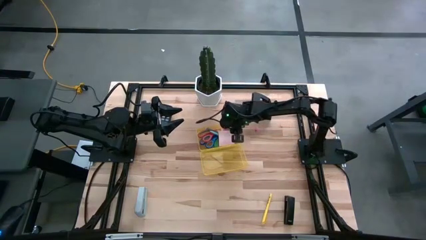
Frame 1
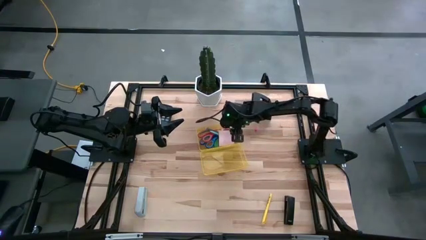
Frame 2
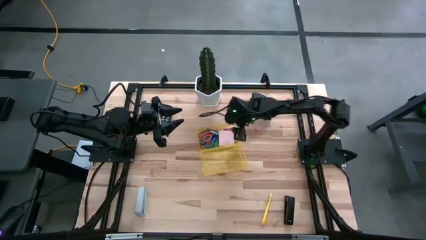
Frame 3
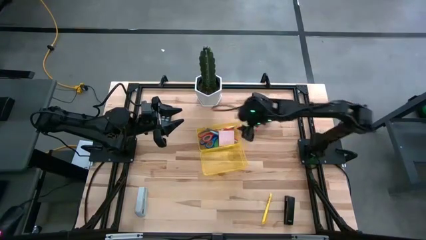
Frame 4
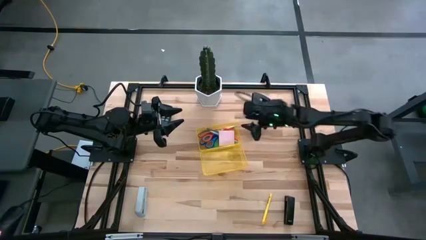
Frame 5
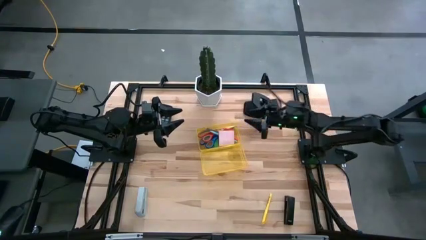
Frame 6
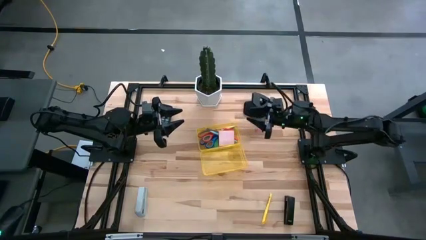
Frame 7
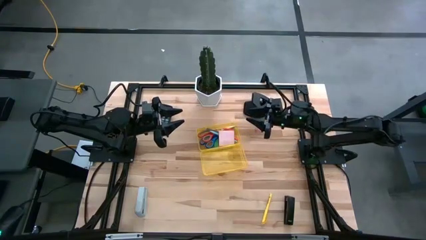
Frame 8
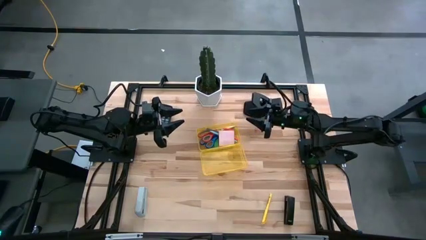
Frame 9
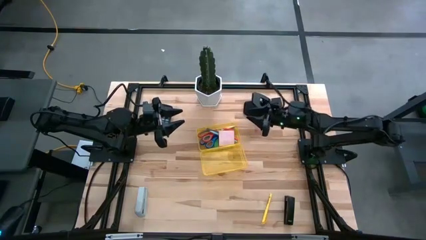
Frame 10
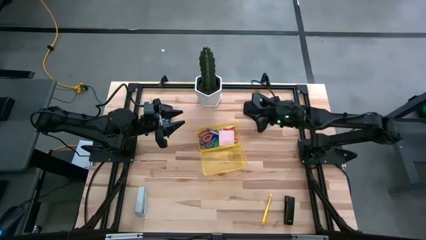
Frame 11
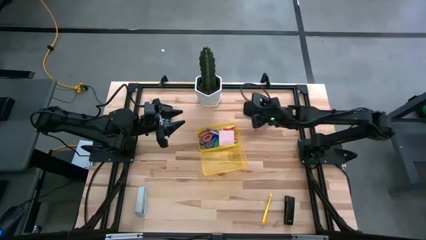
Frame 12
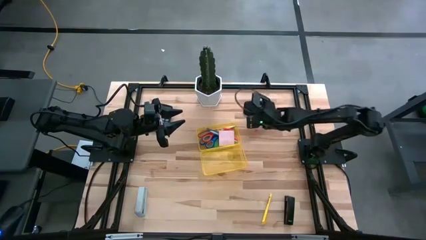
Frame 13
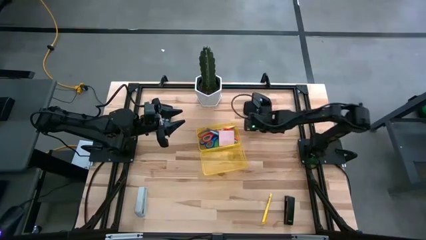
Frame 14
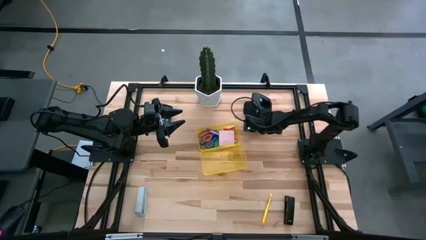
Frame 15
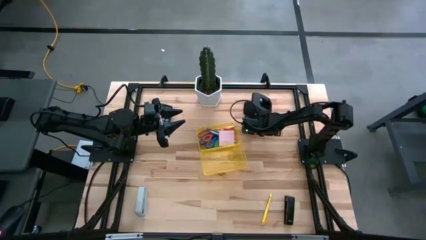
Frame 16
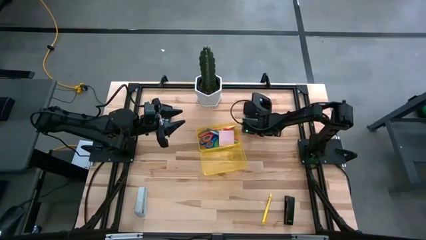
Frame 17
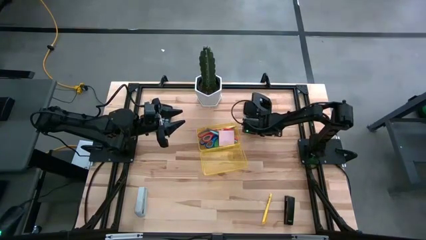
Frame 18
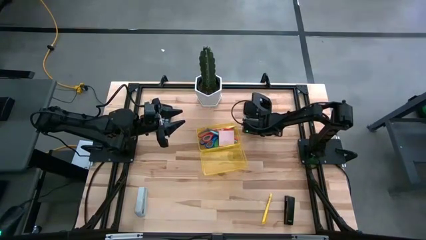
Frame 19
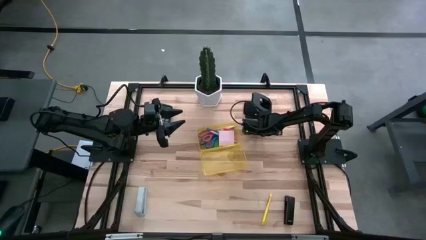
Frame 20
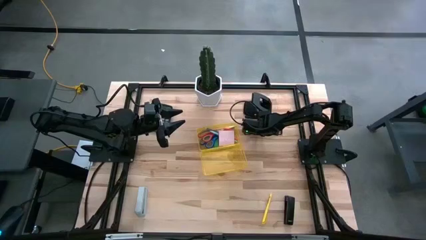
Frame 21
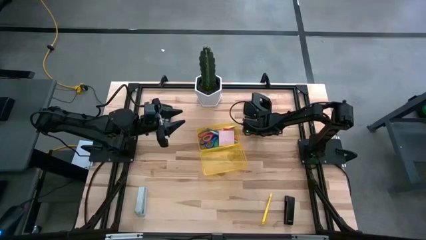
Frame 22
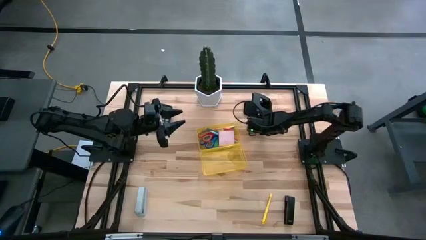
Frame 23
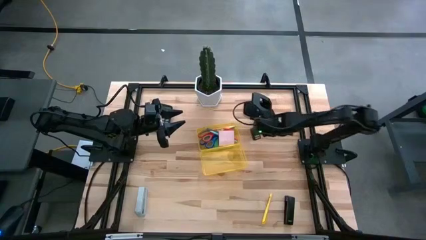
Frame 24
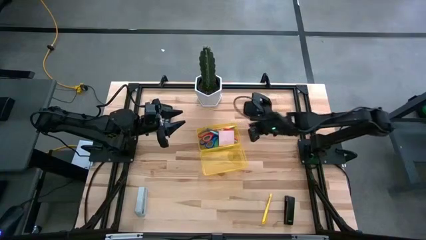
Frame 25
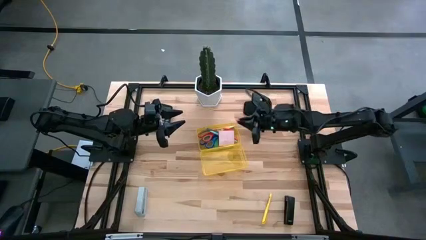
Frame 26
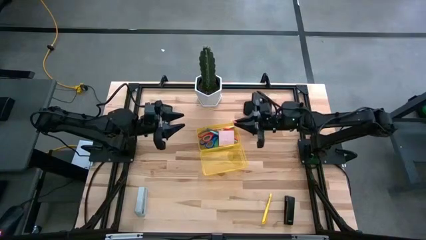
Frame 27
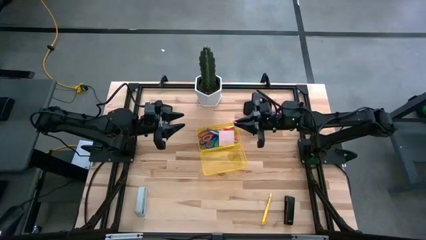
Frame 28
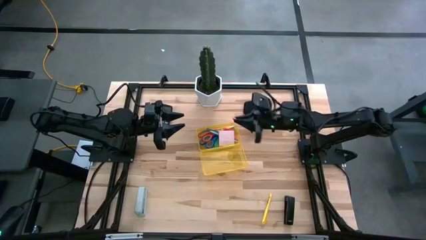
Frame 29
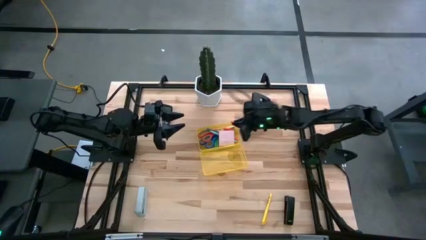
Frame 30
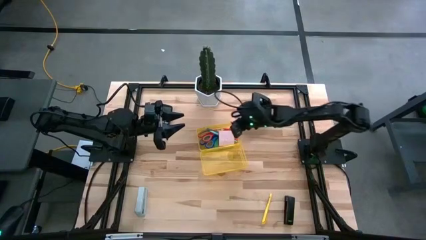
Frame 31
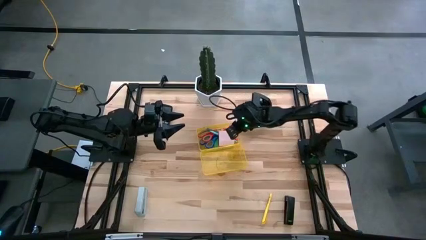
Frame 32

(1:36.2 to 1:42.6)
Task: Pack school essentials
Put the pink eraser into the yellow supply box

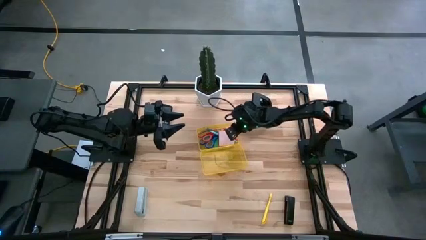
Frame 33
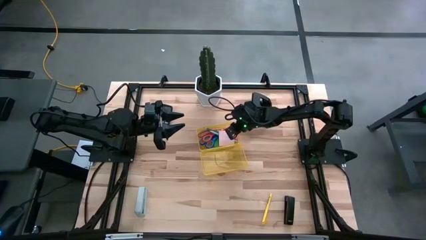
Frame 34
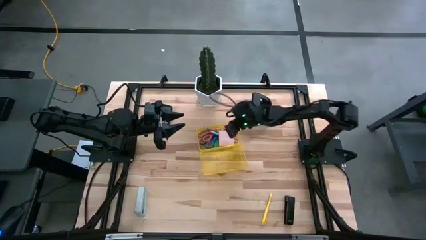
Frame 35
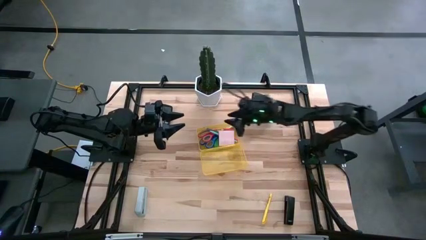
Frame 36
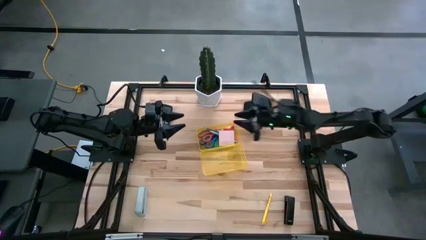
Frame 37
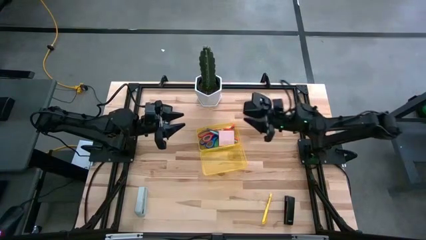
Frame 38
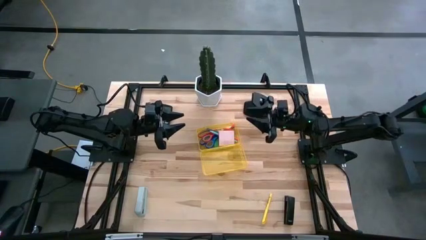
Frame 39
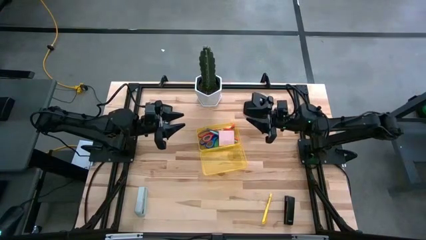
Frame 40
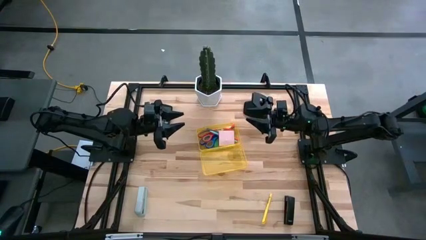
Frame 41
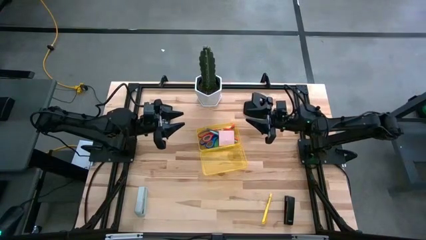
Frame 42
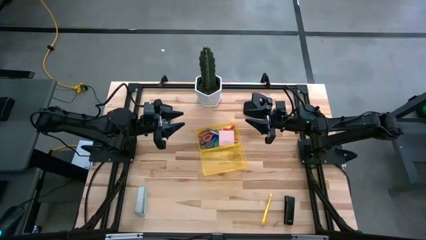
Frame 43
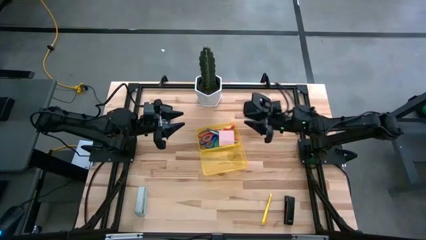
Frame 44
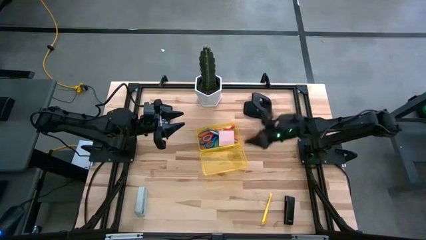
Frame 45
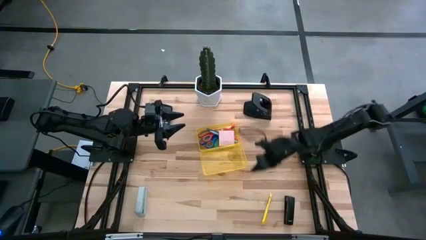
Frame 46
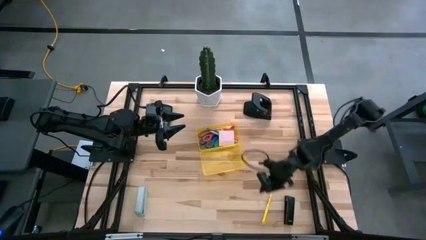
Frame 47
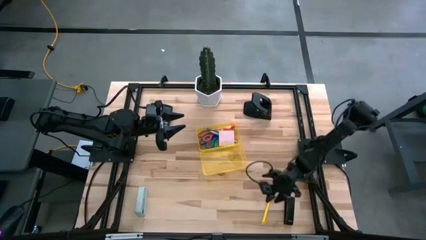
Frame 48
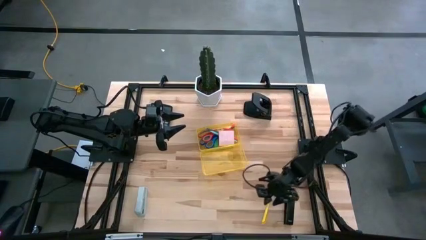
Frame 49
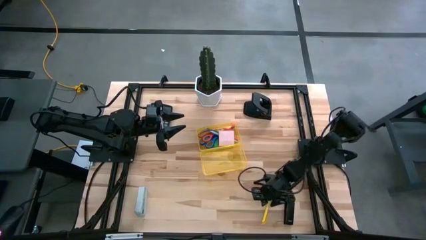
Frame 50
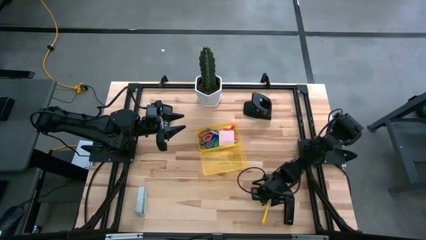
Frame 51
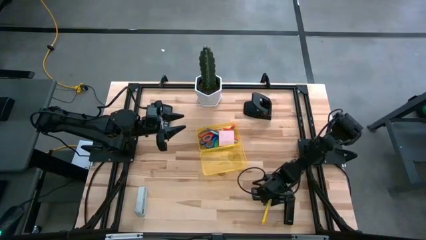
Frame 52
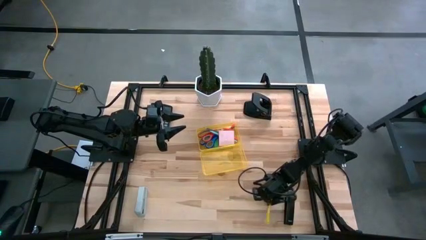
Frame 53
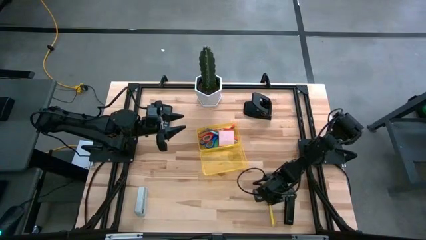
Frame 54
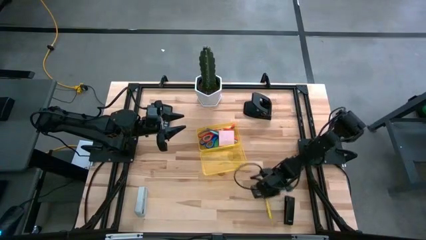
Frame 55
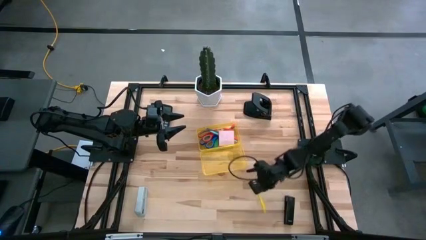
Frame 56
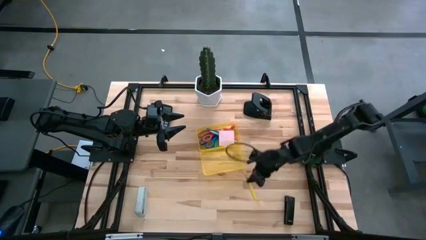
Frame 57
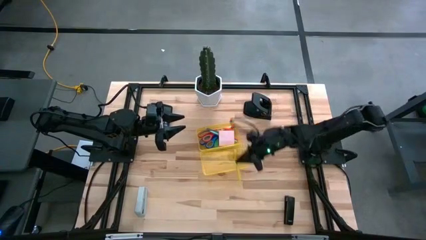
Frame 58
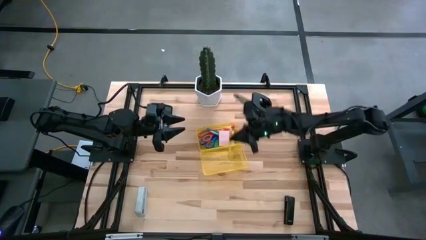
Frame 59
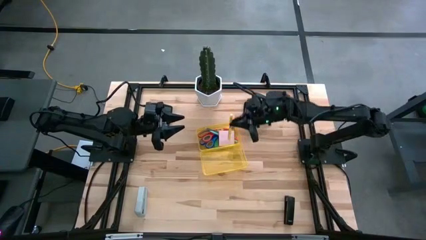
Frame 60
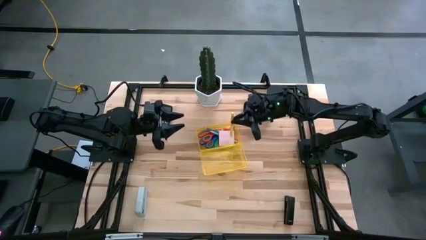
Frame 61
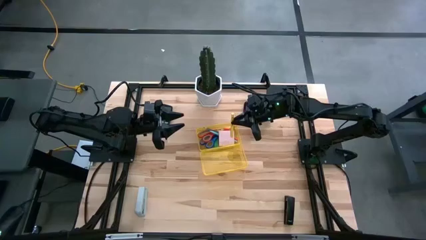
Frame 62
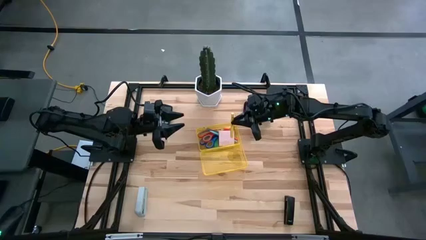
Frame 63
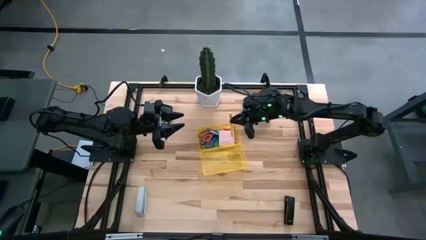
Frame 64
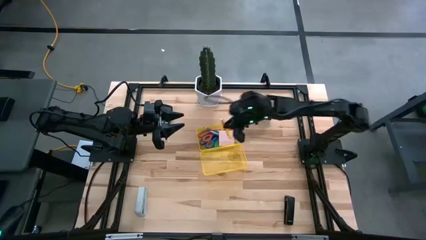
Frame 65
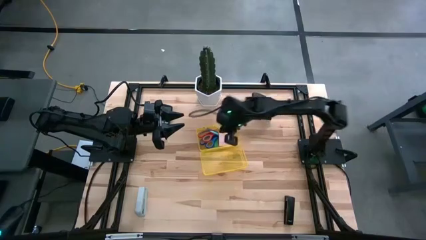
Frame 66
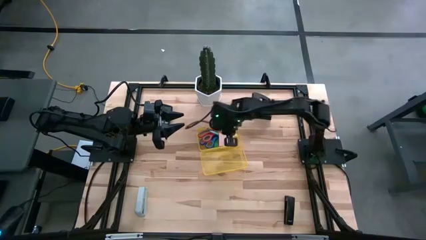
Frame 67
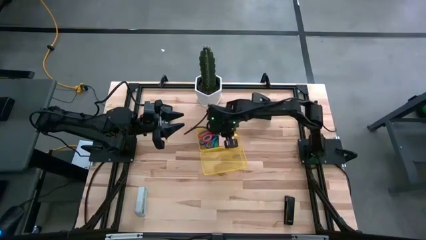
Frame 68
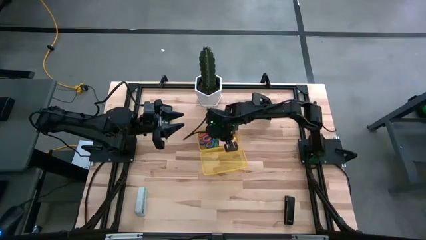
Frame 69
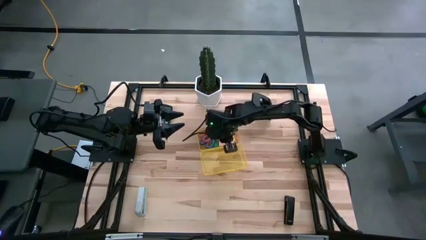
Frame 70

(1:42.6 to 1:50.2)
Put the yellow pen into the yellow supply box

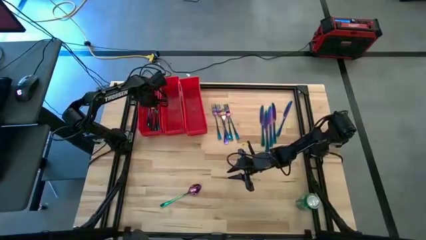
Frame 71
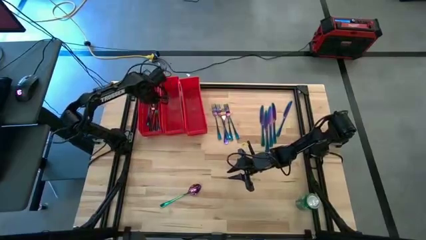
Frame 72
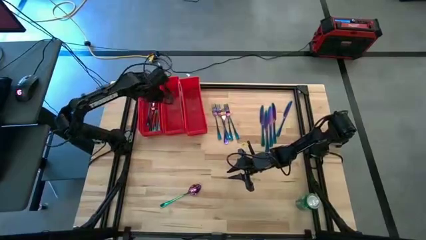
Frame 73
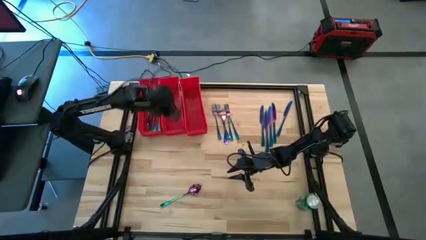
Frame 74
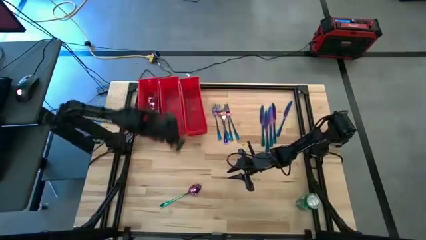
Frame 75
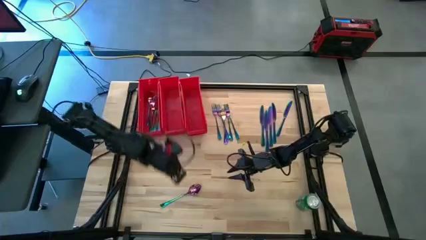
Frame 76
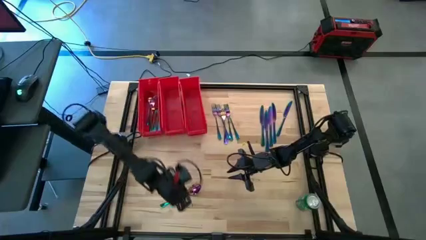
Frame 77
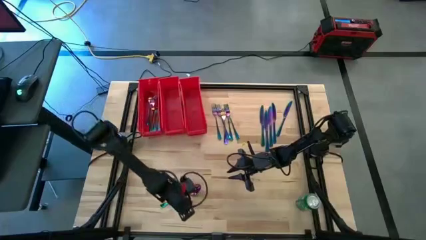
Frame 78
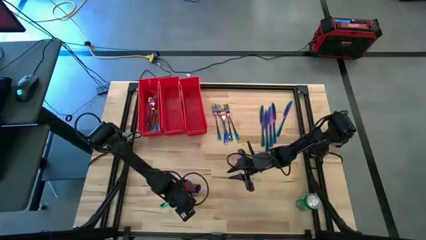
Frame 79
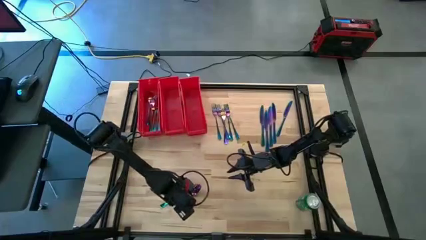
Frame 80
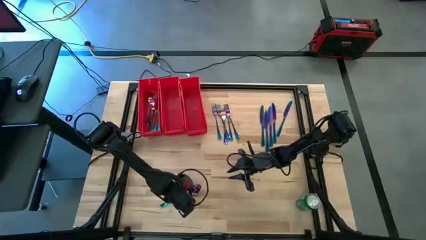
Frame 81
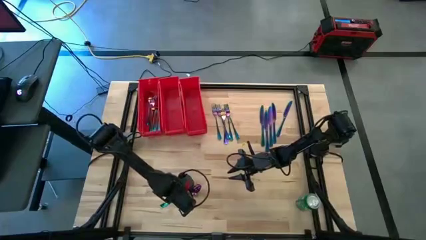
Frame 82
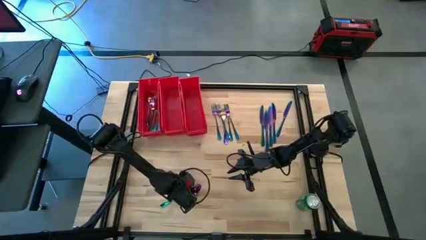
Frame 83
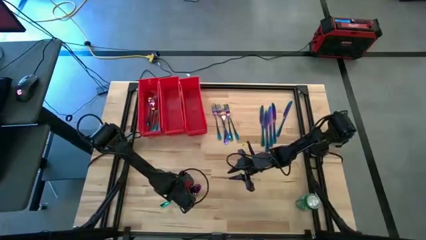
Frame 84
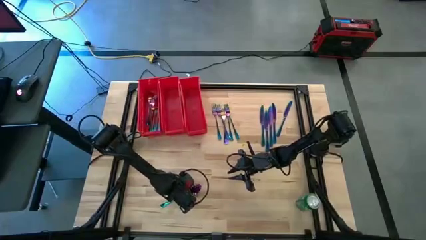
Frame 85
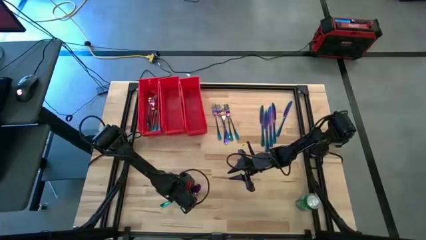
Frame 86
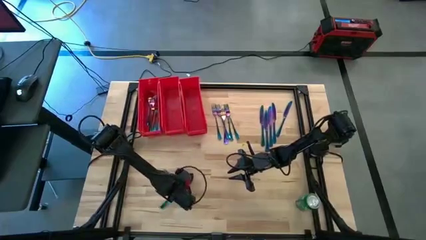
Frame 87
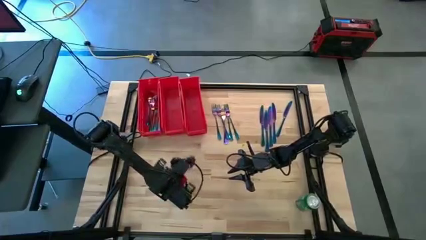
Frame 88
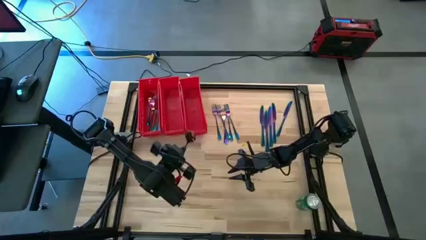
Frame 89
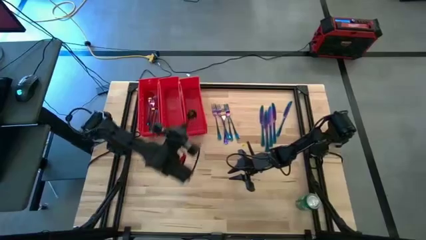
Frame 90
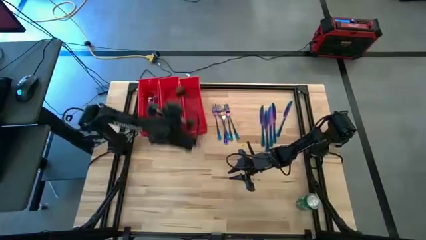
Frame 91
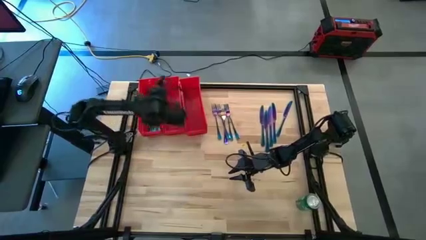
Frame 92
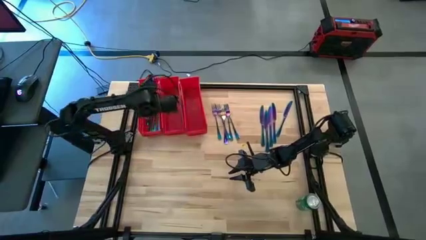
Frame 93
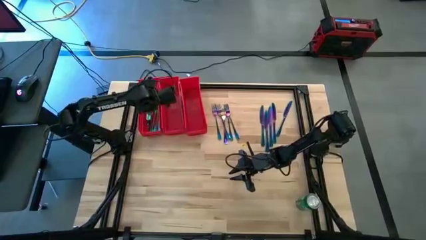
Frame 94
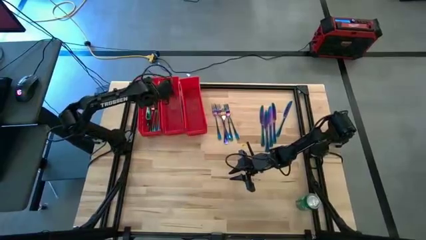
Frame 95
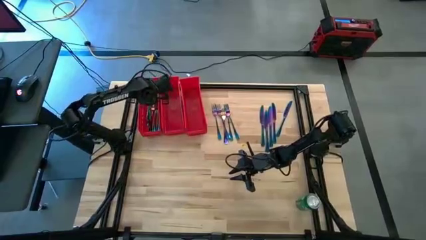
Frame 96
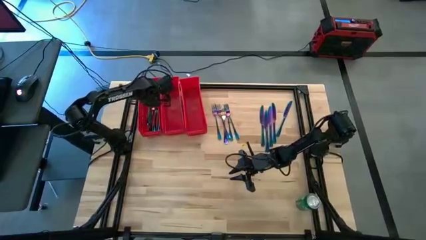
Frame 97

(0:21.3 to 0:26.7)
Task: Sort silverware
Put the blue spoon into the left red bin
